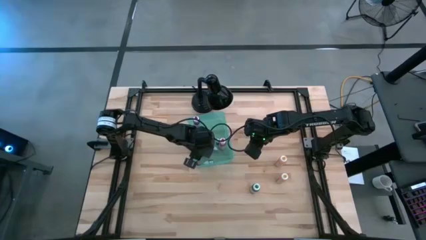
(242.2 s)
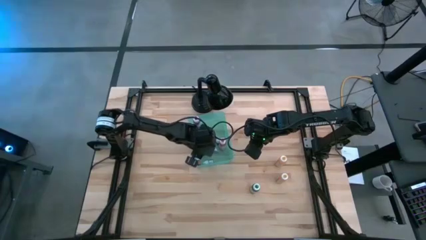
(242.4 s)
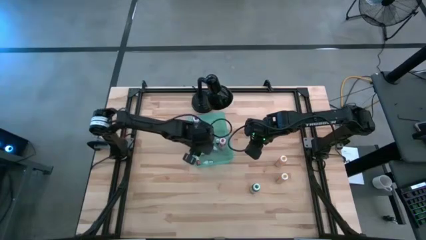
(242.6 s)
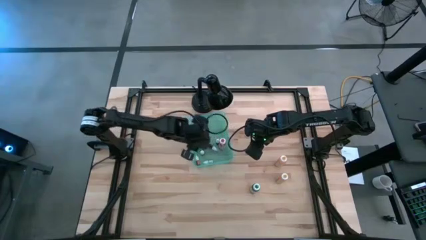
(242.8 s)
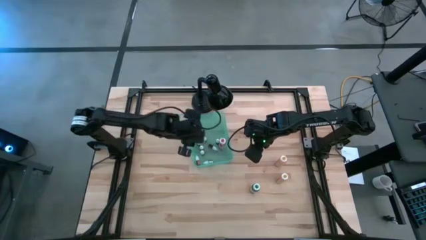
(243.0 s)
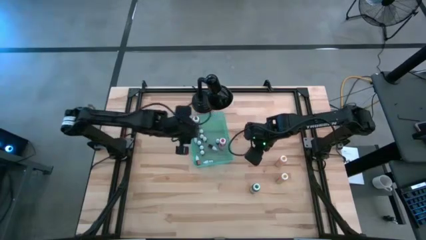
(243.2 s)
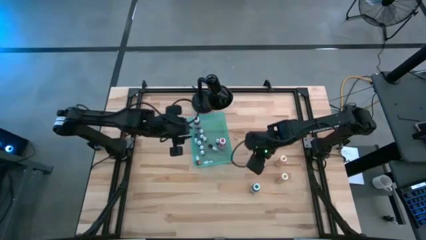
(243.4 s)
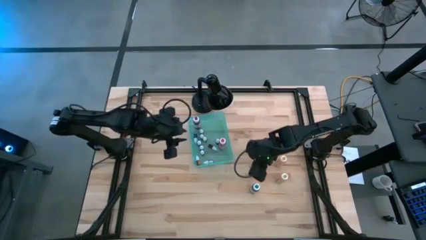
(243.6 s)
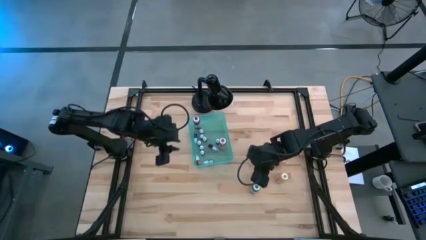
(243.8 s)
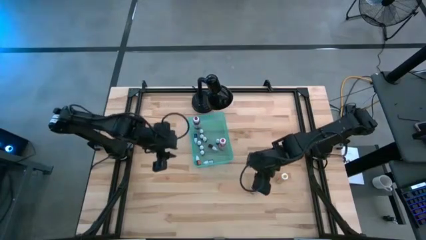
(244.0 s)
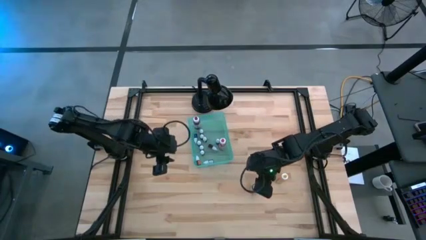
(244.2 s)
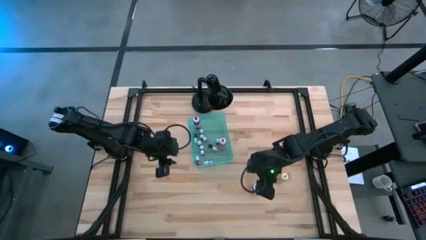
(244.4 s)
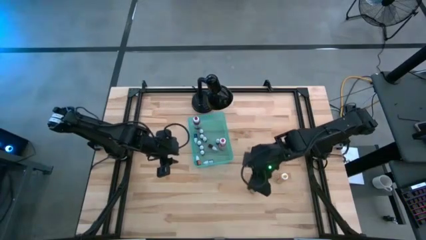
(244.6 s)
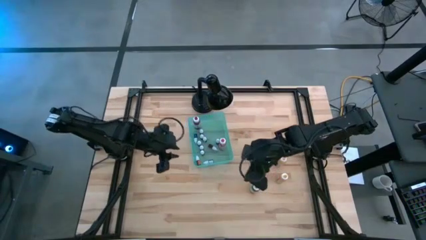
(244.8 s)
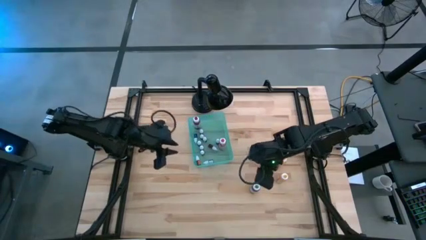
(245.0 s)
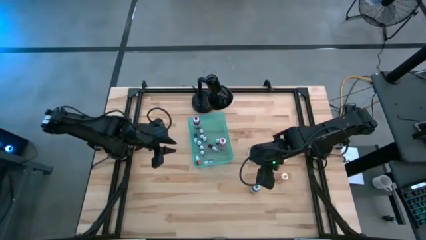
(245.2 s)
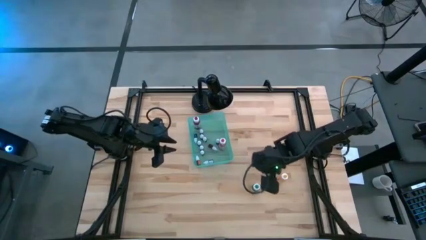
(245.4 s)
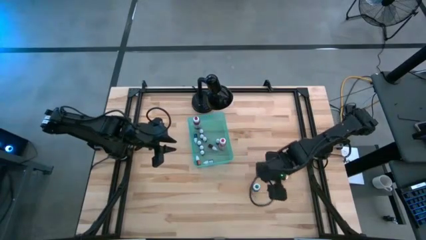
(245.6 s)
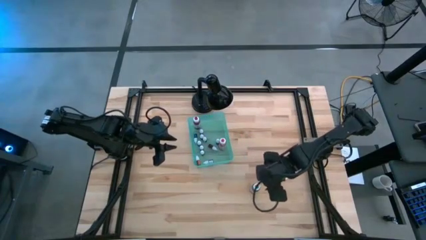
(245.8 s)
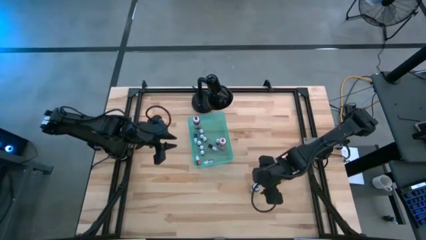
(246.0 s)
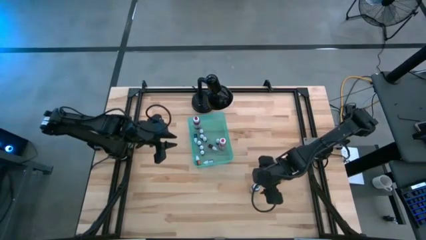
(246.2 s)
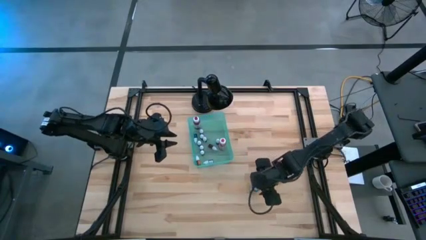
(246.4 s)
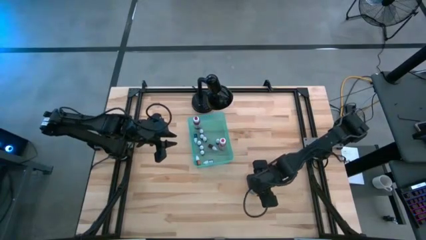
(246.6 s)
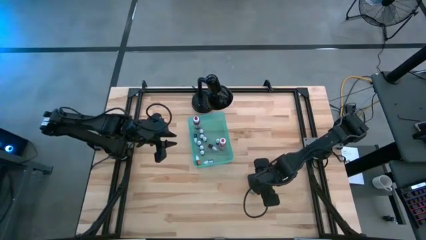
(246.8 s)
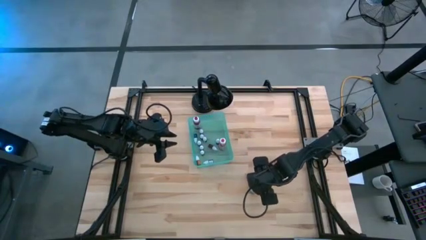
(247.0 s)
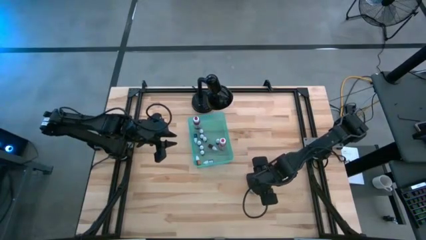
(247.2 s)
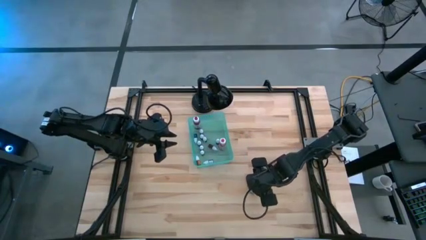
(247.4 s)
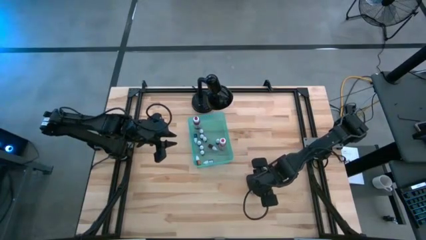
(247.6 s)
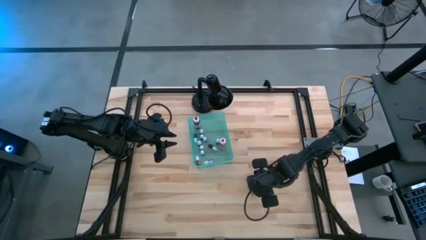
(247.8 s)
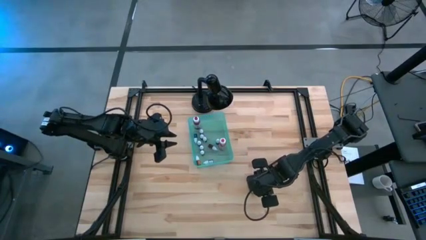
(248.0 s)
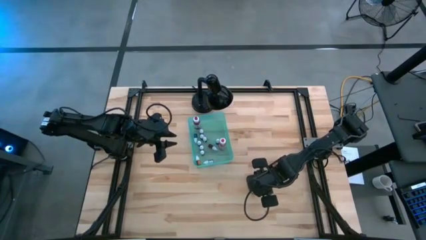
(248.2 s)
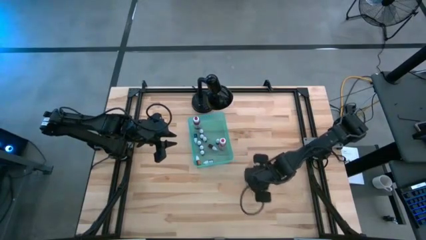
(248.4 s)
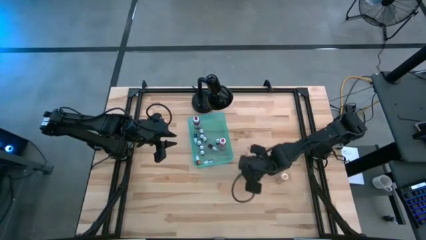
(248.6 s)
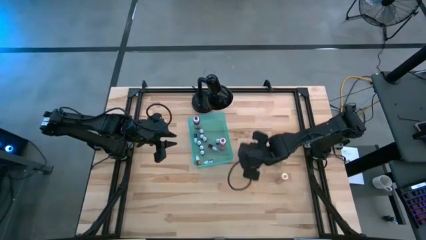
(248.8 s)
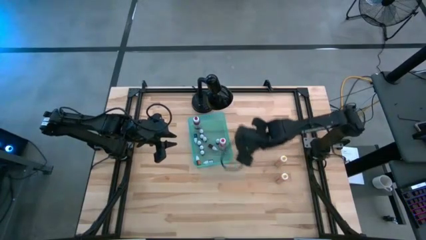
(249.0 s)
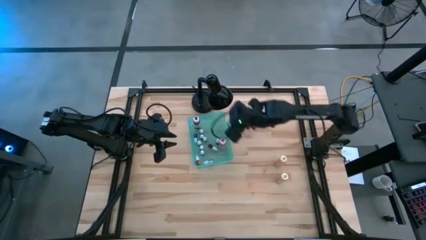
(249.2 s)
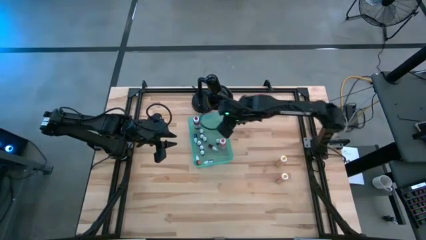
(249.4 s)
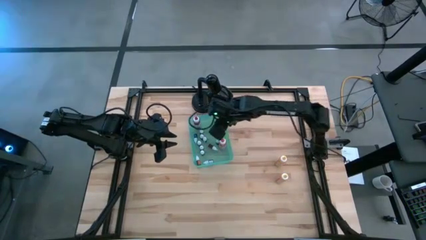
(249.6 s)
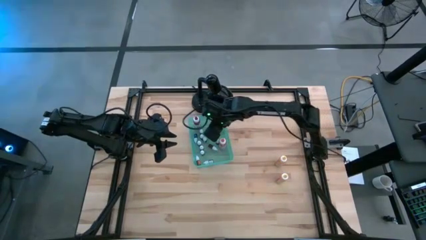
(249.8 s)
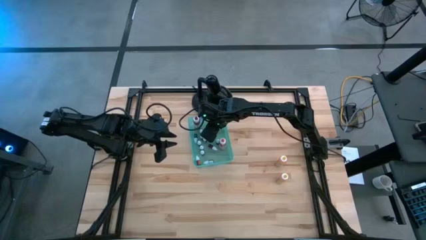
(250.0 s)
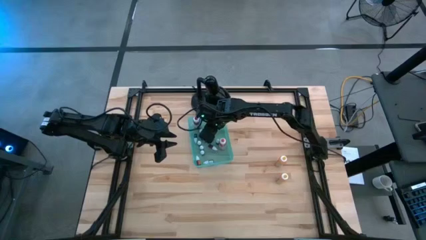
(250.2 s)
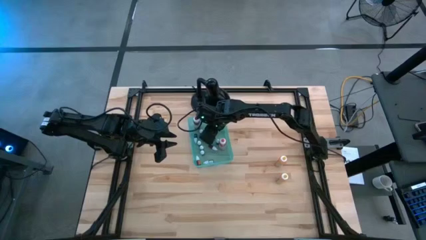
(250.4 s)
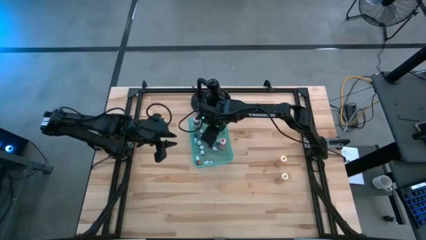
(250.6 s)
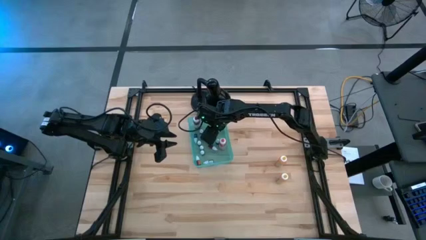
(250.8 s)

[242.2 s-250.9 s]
Task: Pick & Place food coloring
Put the large green food coloring bottle into the green bin

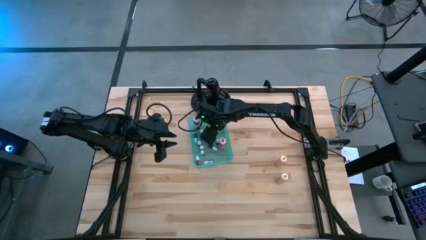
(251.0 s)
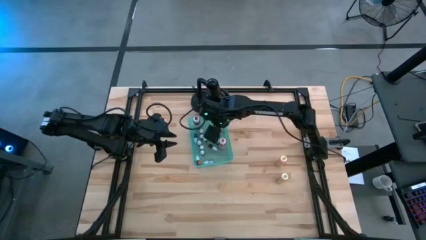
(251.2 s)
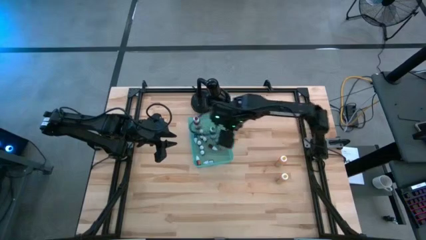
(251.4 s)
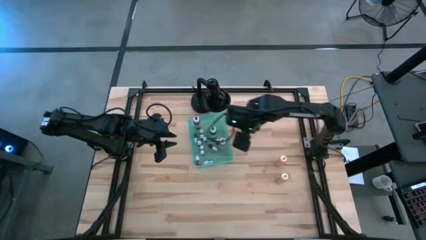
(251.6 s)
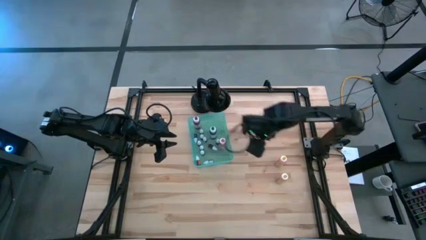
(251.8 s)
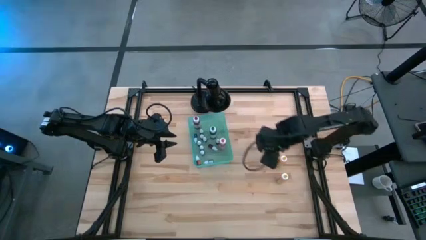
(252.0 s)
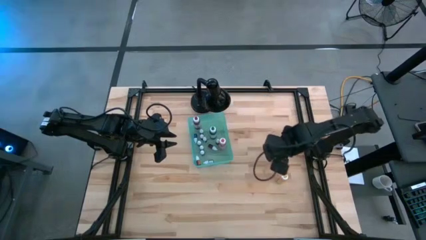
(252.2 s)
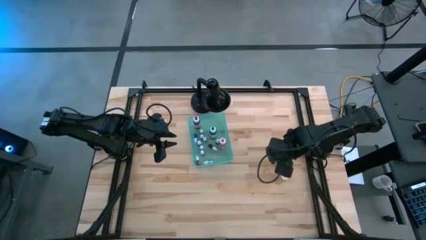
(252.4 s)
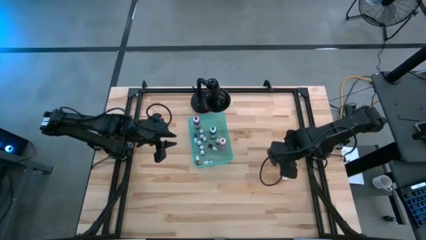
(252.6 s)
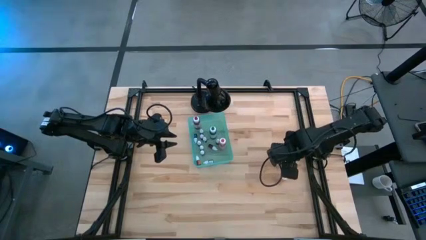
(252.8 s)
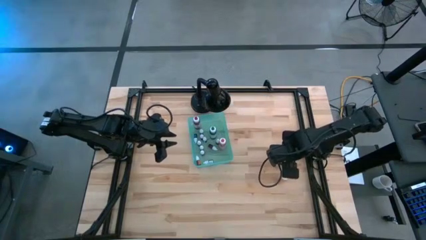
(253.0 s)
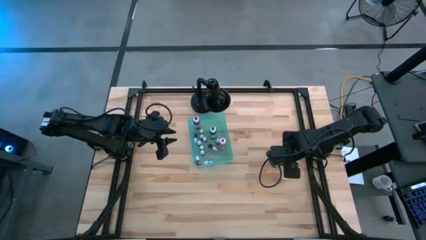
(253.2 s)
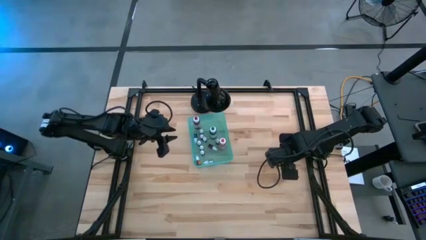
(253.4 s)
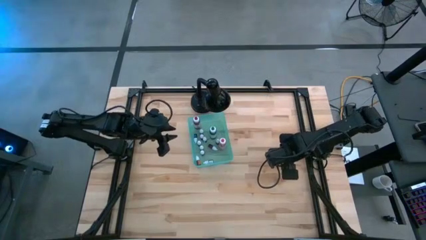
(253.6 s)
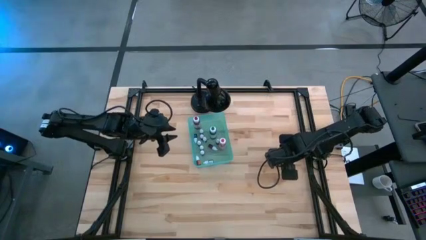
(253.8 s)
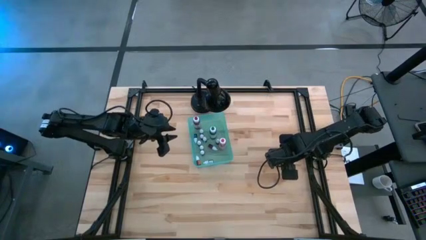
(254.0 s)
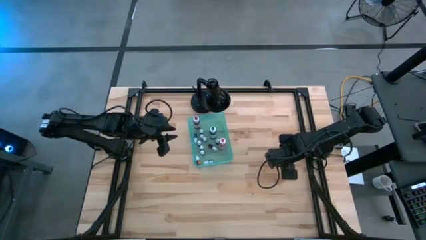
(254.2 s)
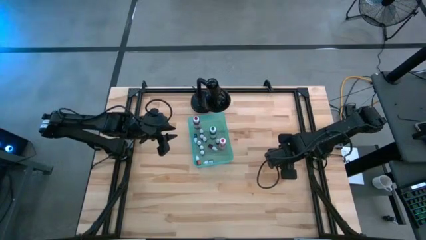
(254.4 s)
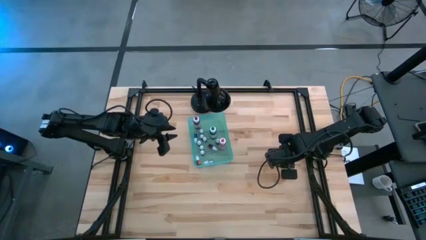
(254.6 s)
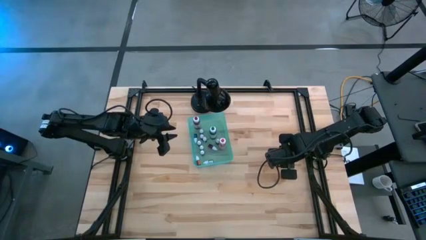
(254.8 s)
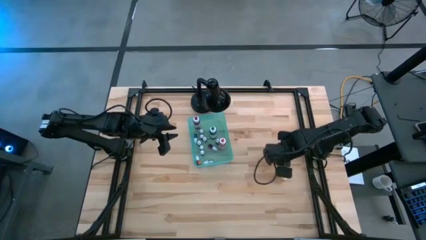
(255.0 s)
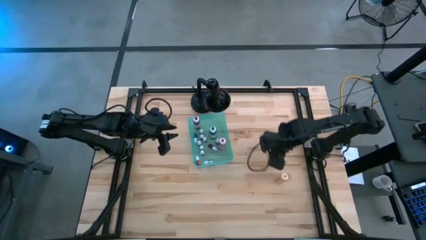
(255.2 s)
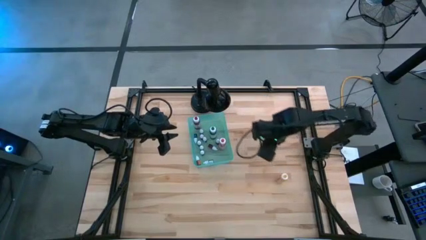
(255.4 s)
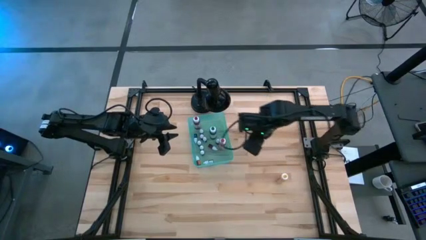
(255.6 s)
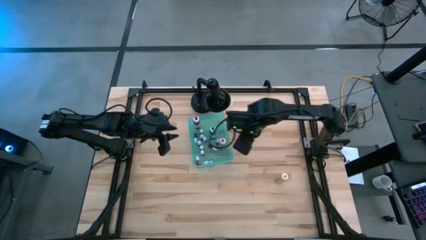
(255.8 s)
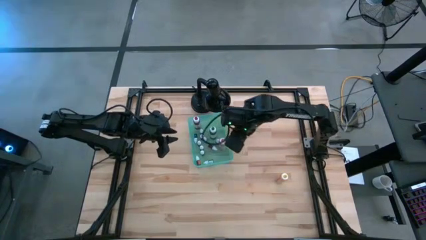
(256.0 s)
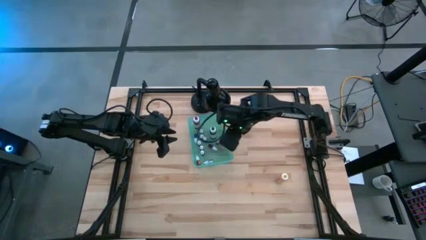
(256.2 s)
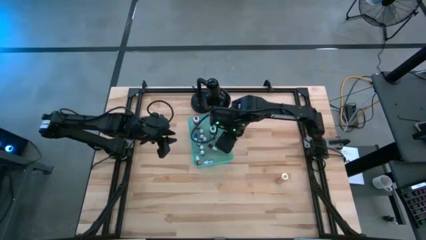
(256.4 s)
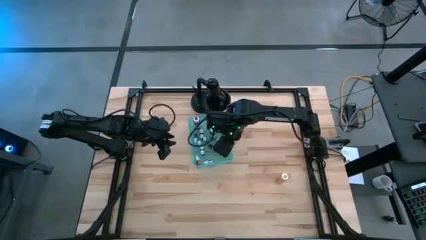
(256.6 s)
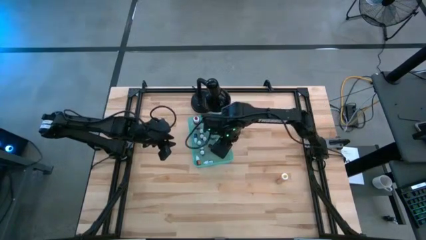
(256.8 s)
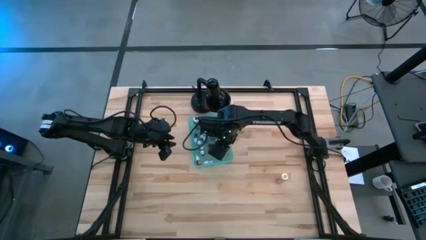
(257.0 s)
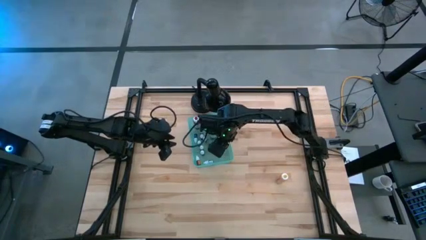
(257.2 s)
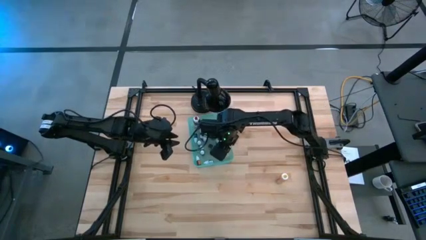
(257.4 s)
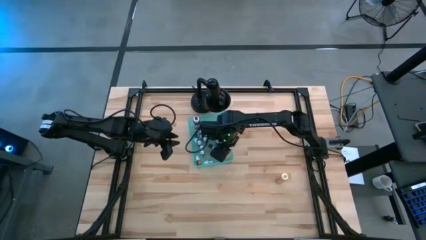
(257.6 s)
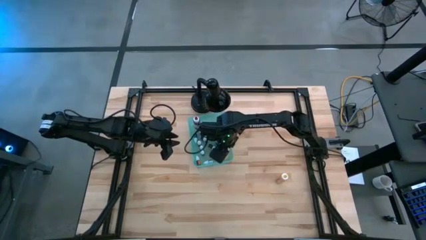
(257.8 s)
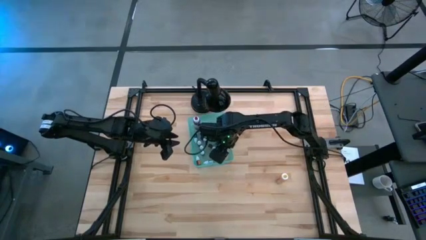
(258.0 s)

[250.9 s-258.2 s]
Put the large yellow food coloring bottle into the green bin

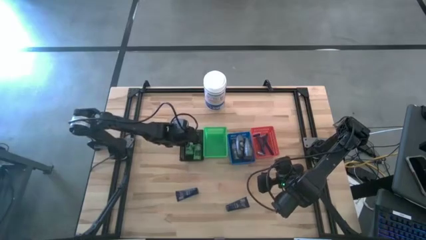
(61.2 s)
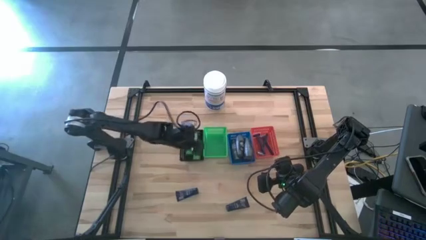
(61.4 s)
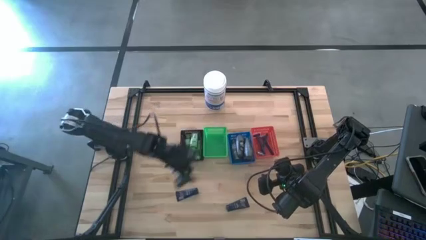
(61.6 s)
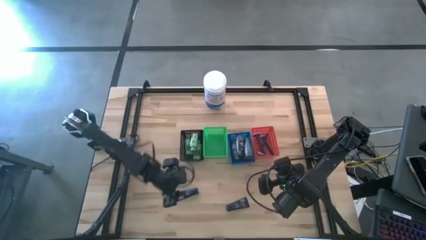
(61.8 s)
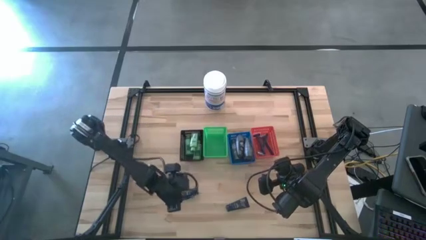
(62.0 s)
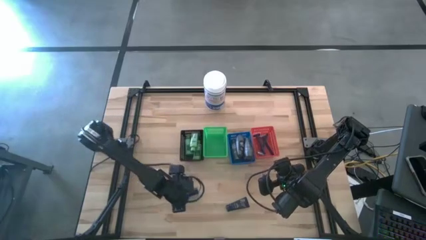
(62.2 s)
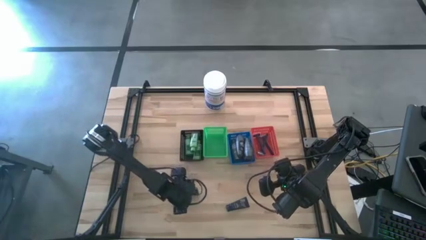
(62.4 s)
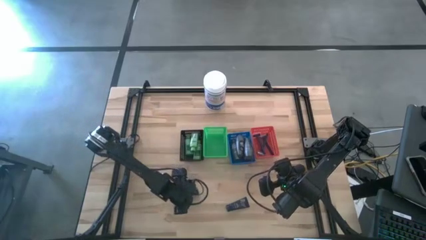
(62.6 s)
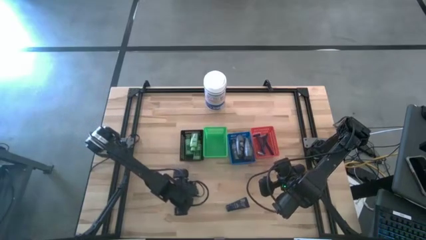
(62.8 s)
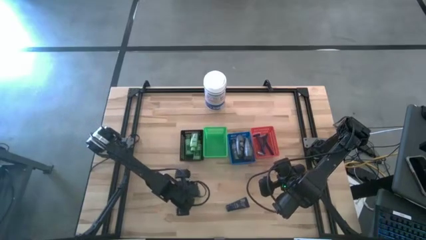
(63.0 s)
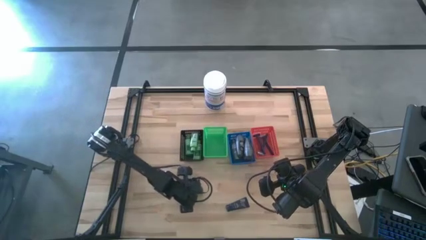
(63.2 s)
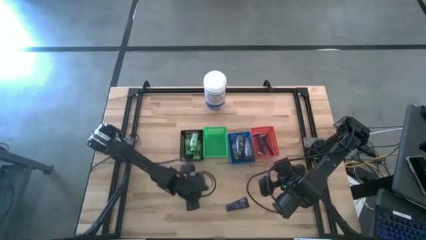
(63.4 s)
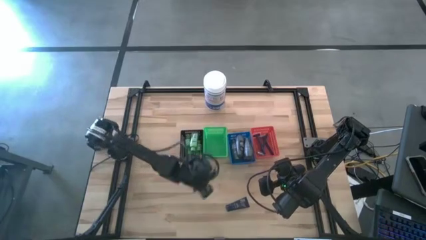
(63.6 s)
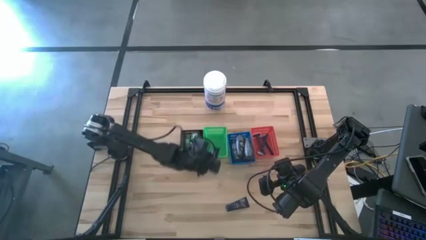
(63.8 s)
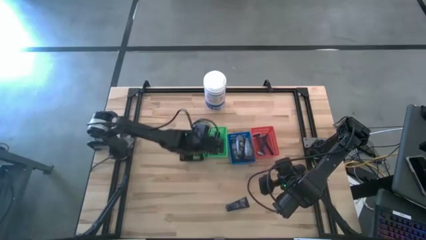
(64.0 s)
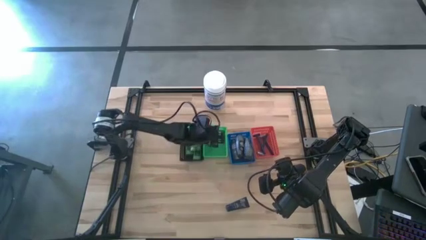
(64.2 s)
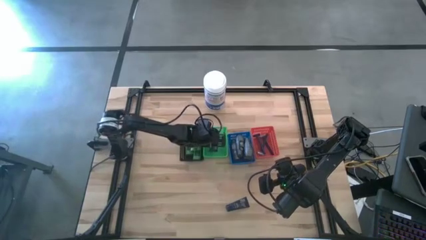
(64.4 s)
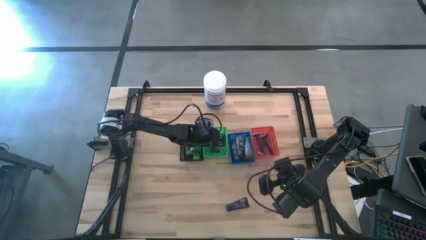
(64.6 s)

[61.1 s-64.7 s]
Task: Pick & Place Travel size toiletries
Put the shave cream into the green basket
